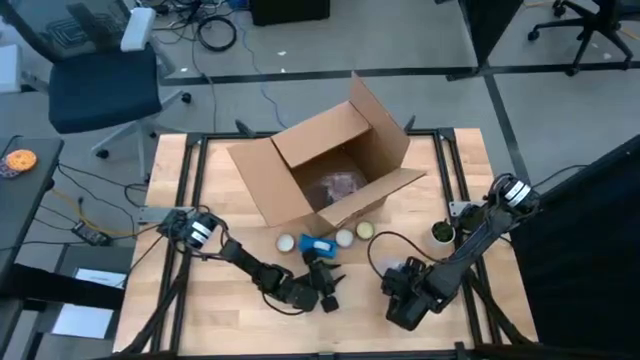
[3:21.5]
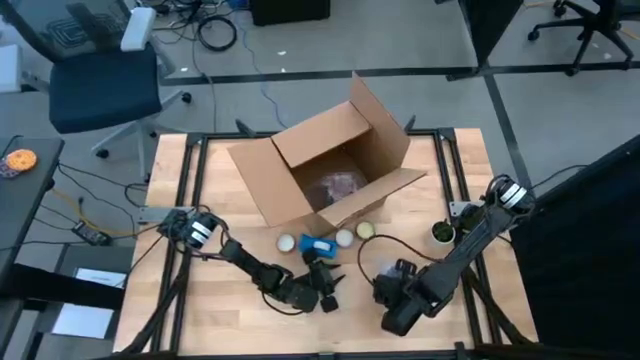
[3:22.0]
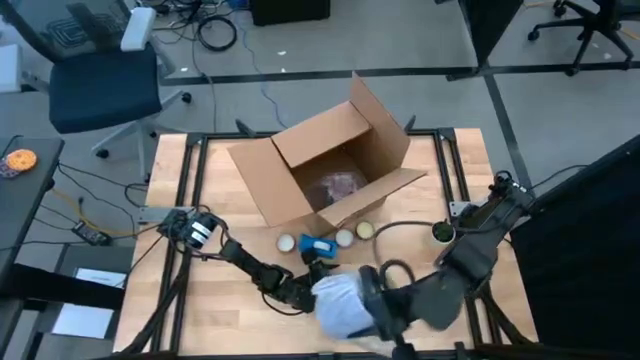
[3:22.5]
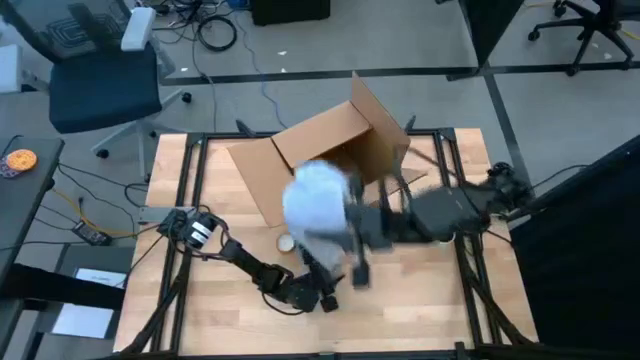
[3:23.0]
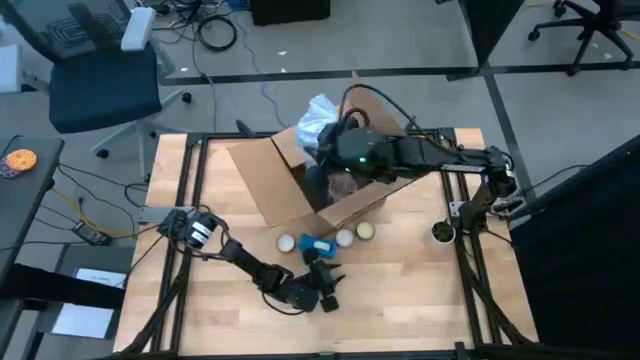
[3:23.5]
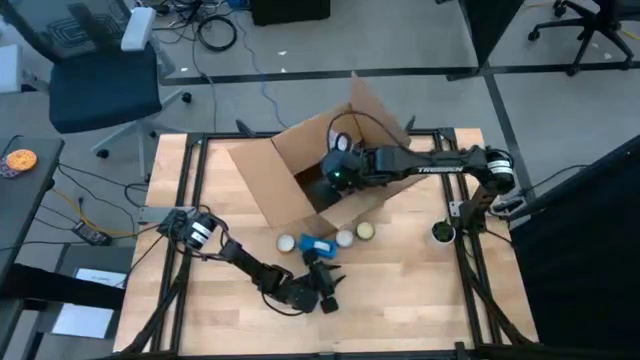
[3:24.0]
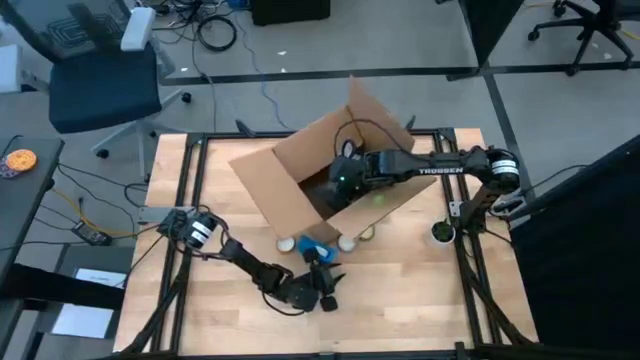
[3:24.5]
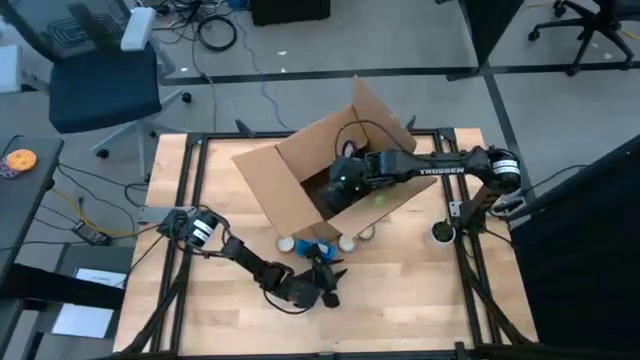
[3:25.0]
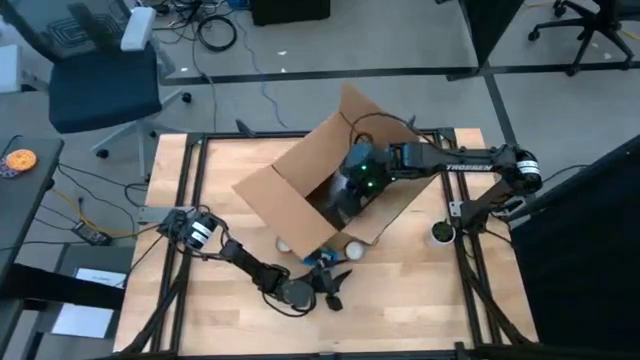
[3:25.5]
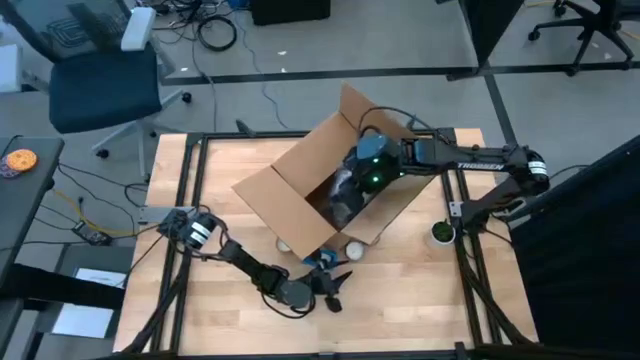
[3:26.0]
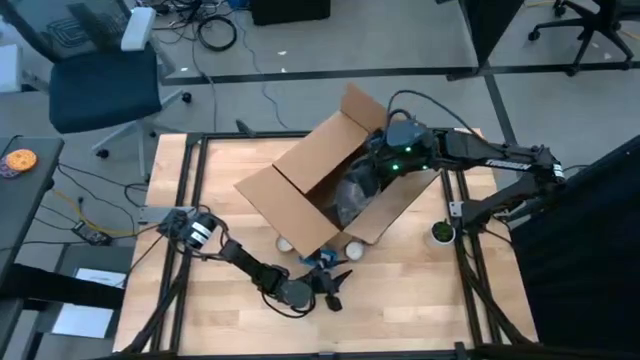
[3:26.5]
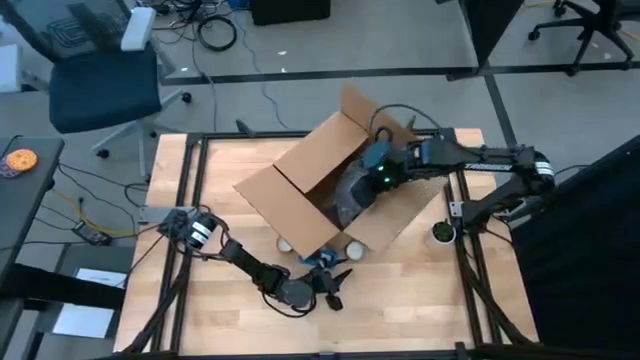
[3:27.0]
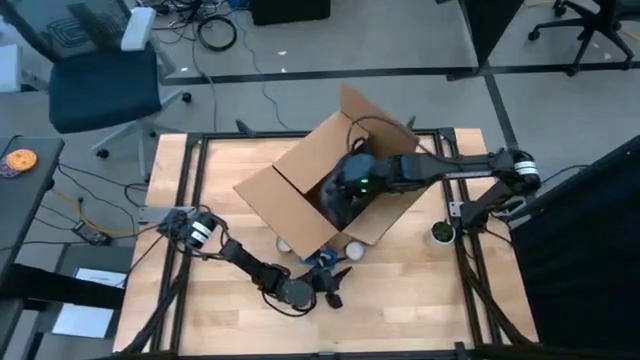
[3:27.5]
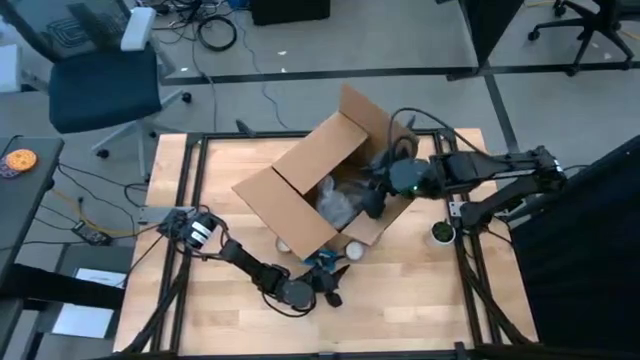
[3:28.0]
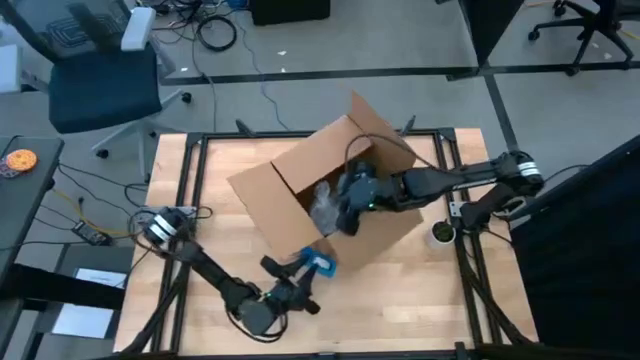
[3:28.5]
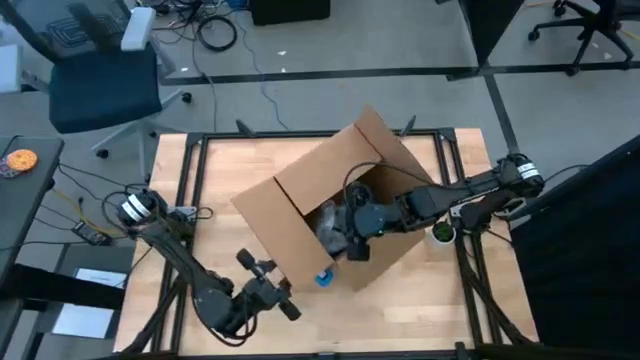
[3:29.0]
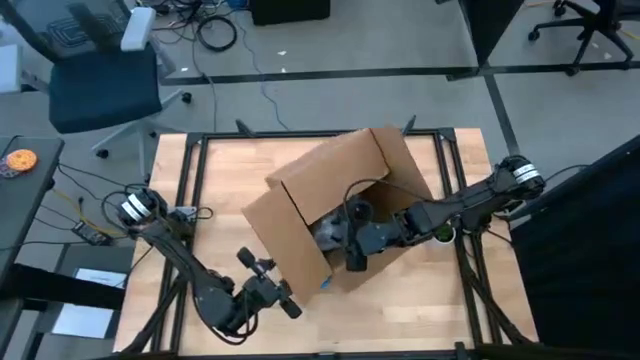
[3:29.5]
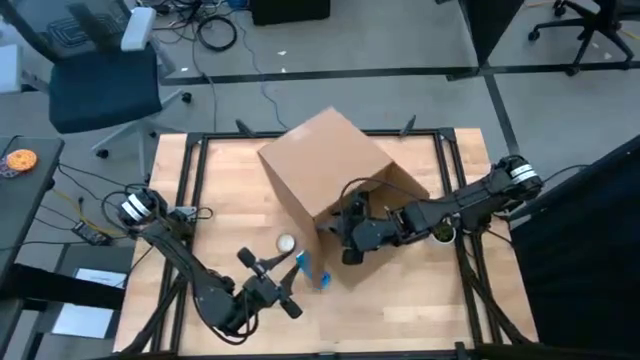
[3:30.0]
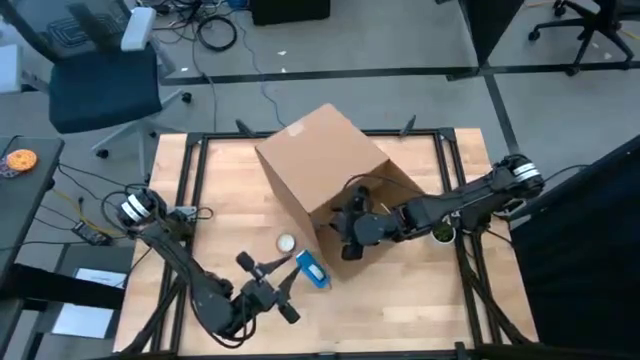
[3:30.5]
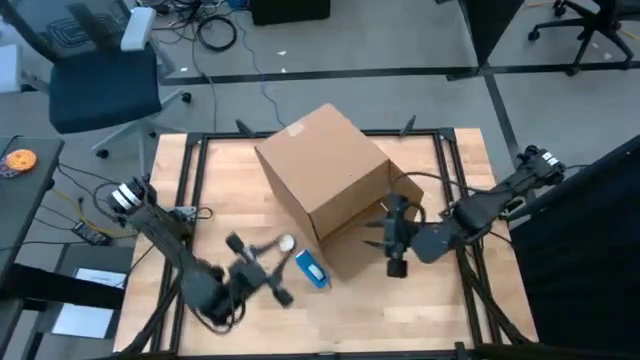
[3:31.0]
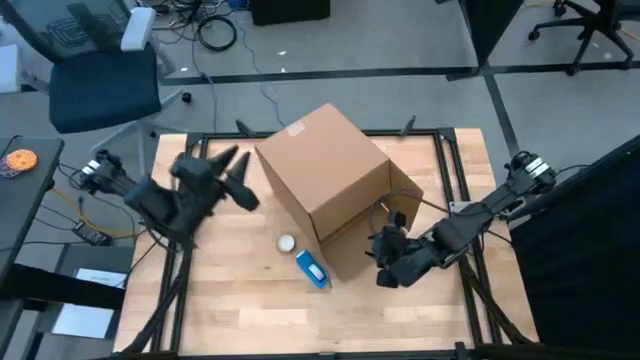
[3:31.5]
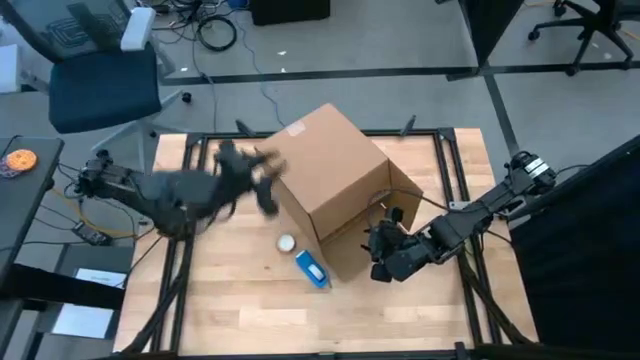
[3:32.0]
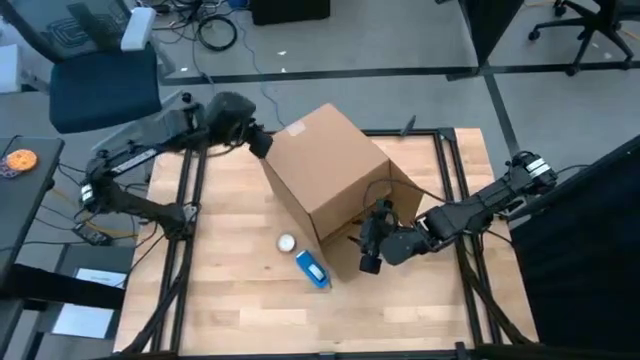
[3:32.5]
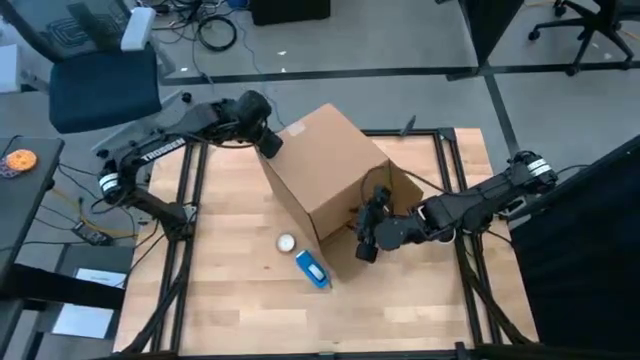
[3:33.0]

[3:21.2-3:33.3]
Task: wrap mug
Put the wrapped purple mug into the box

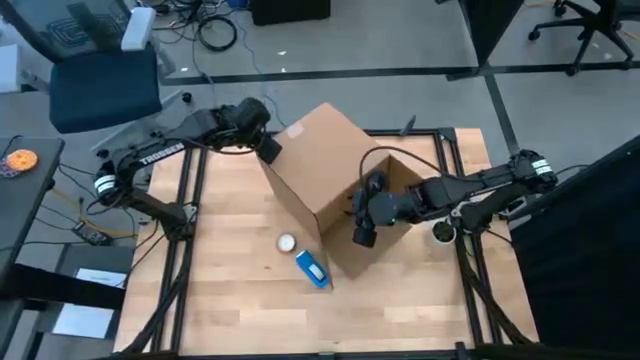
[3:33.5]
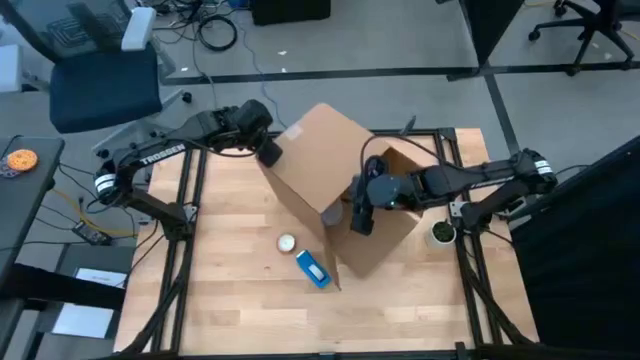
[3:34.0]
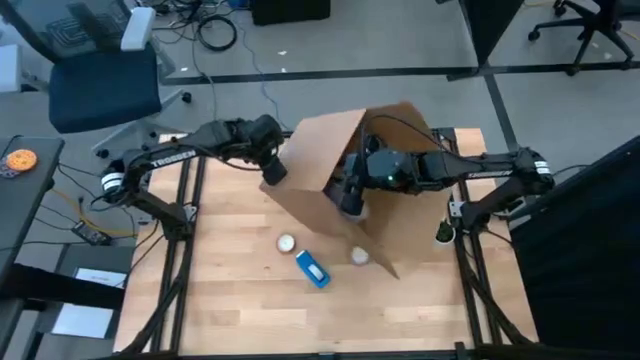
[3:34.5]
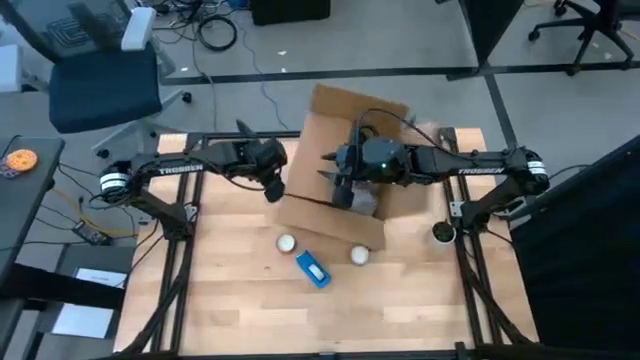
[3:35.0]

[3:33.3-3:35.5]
Adjust the box

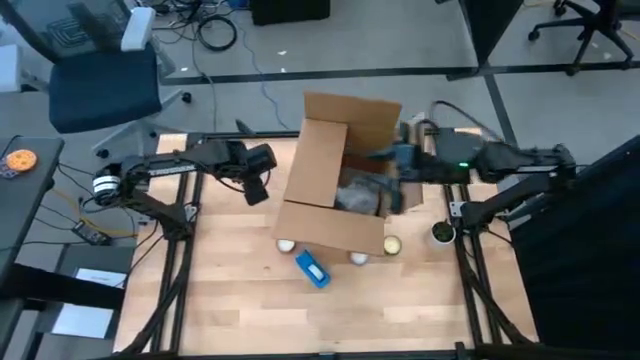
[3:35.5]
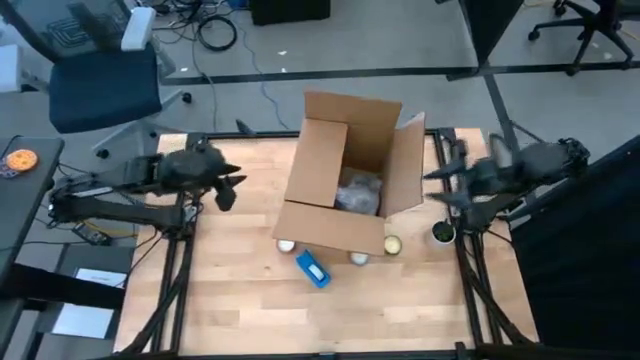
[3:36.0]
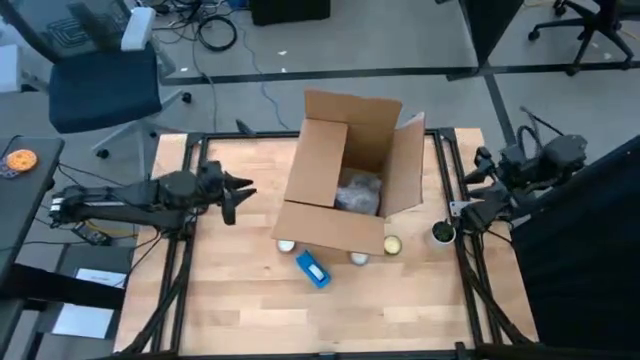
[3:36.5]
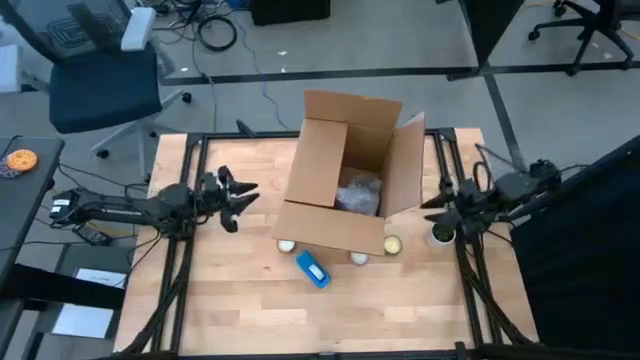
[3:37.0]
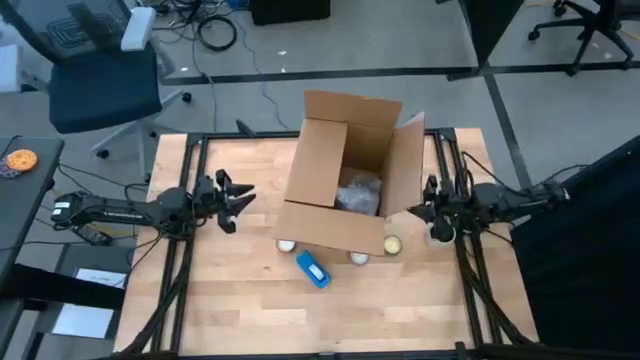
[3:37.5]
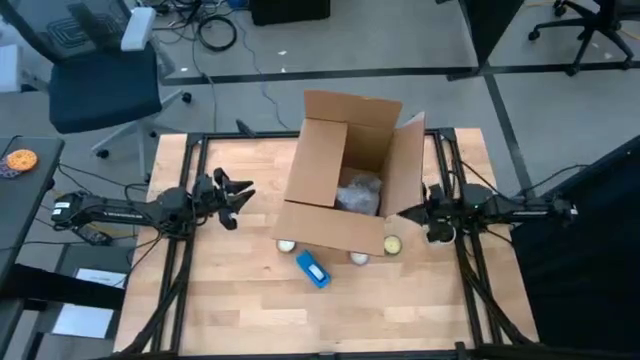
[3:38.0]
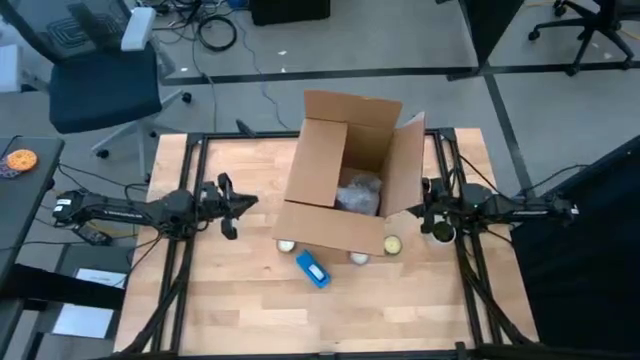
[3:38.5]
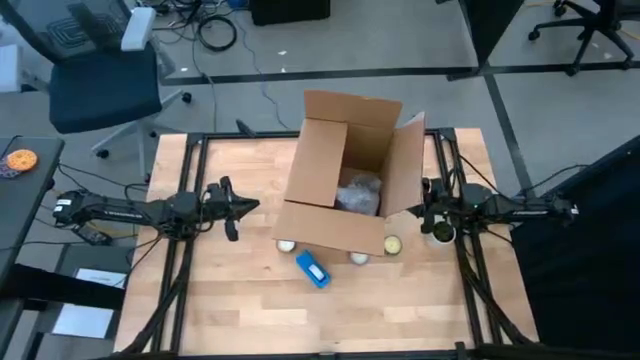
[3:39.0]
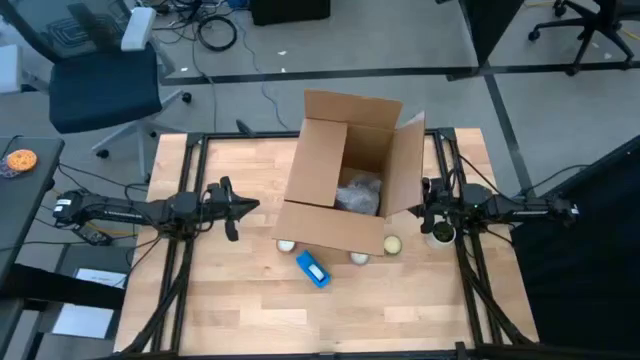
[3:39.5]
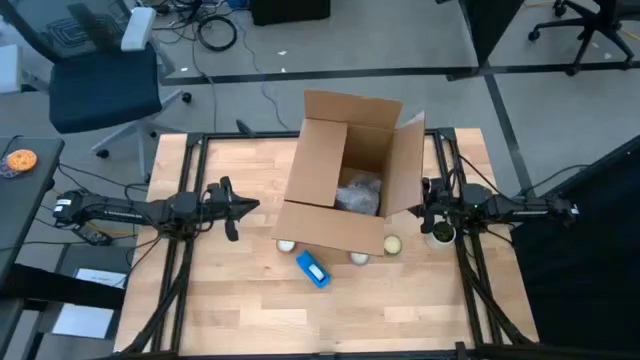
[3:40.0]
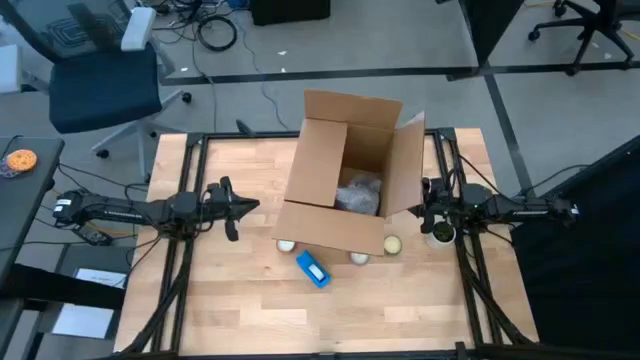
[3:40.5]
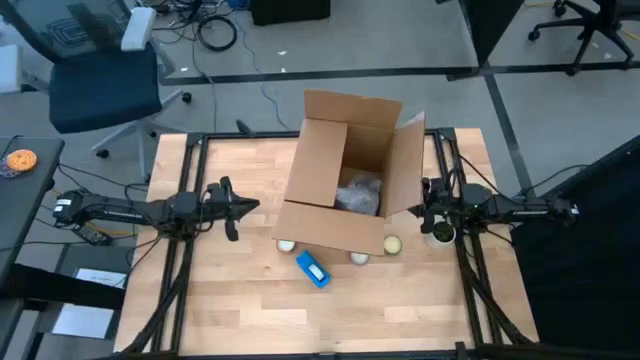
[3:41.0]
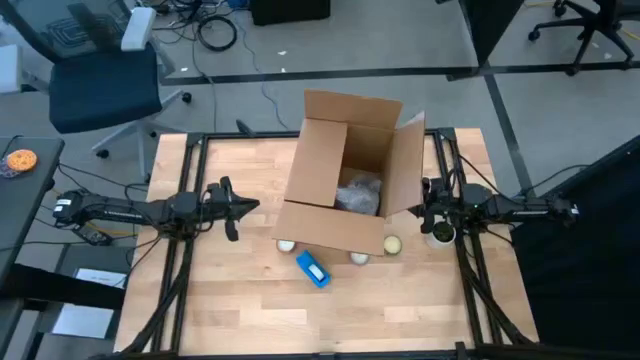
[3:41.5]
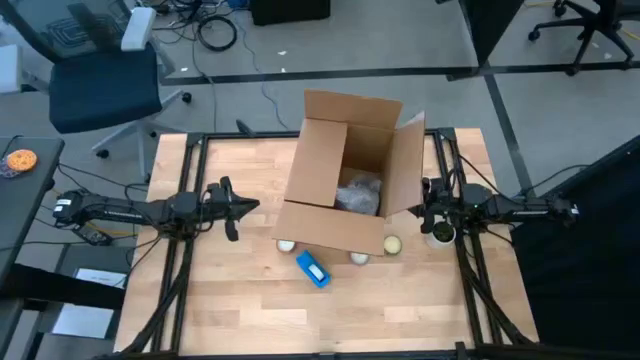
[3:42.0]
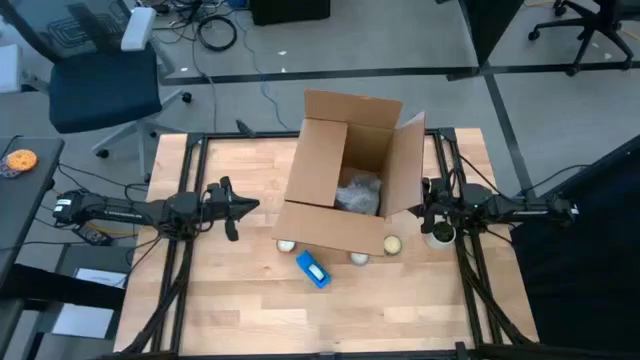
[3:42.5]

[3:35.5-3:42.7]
Return to Home Position
